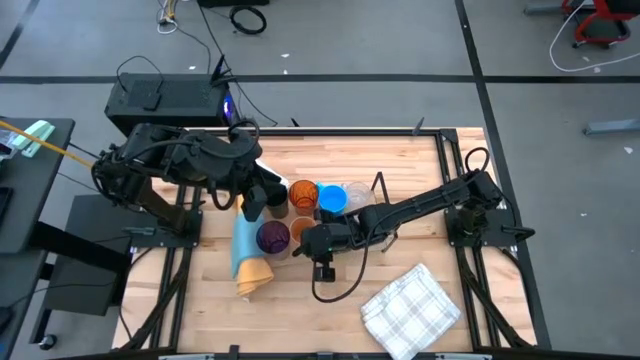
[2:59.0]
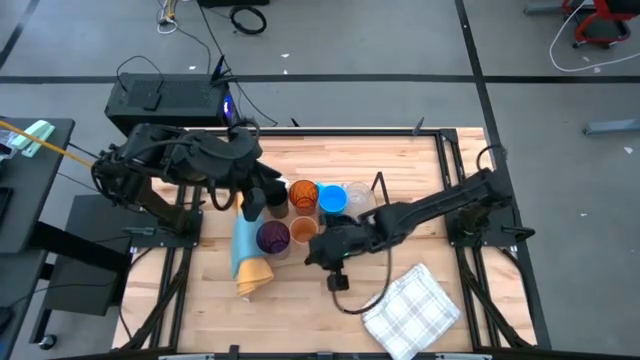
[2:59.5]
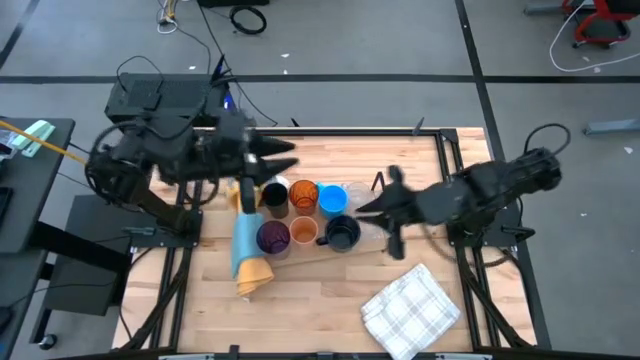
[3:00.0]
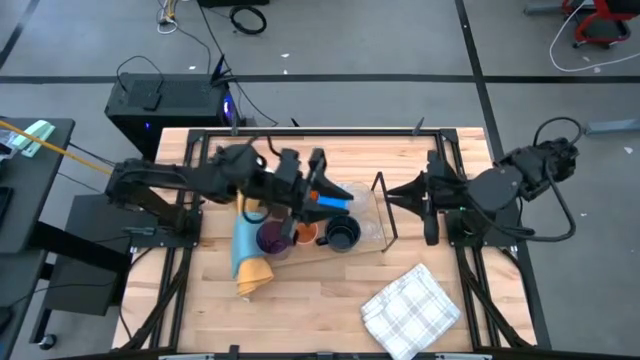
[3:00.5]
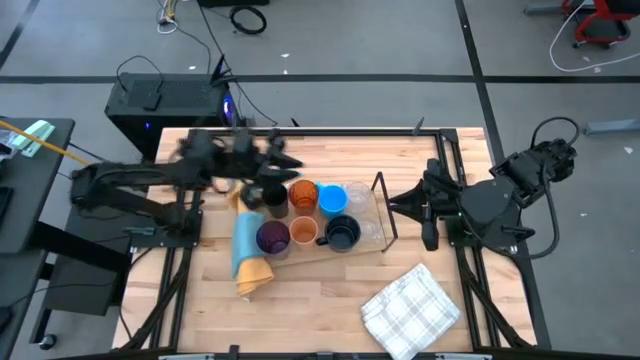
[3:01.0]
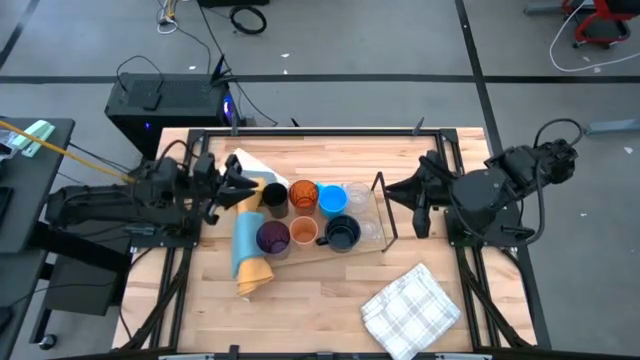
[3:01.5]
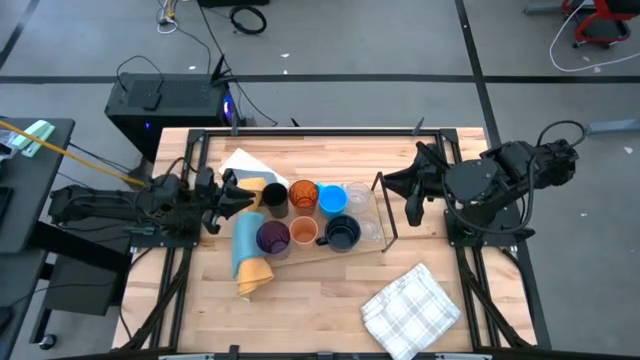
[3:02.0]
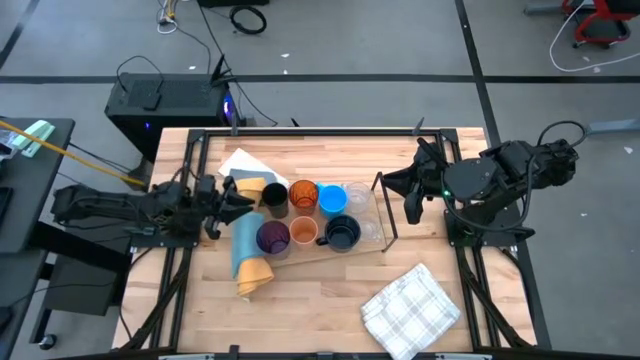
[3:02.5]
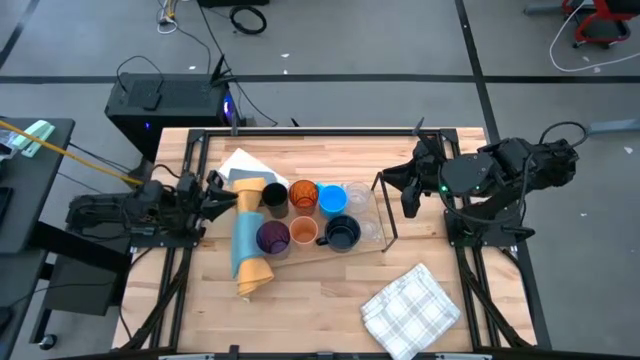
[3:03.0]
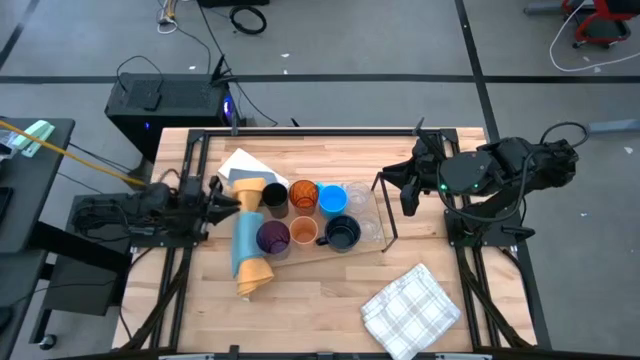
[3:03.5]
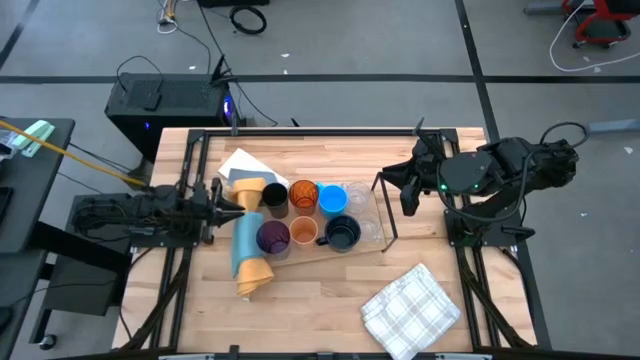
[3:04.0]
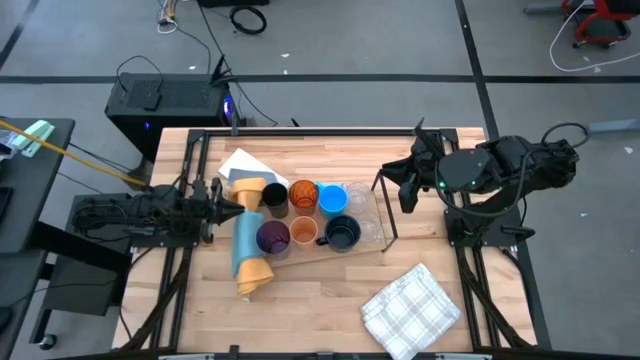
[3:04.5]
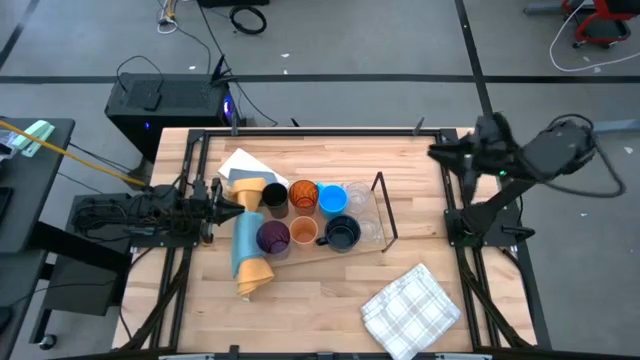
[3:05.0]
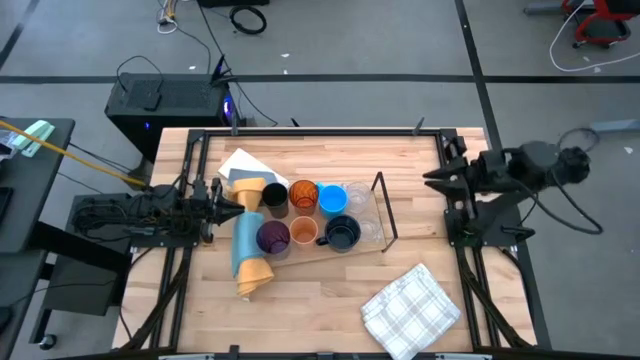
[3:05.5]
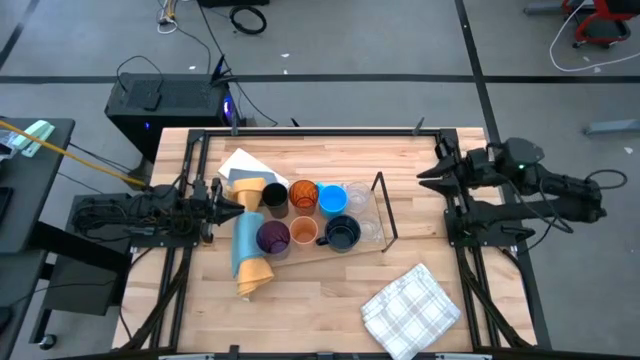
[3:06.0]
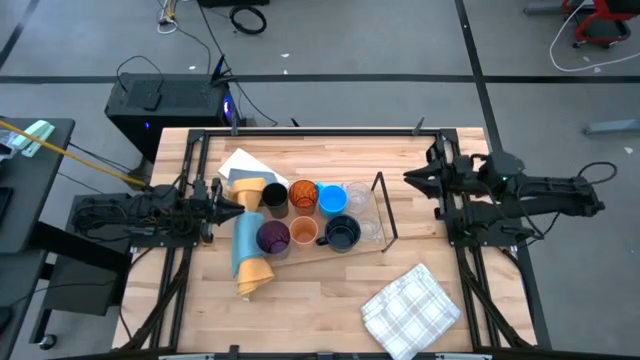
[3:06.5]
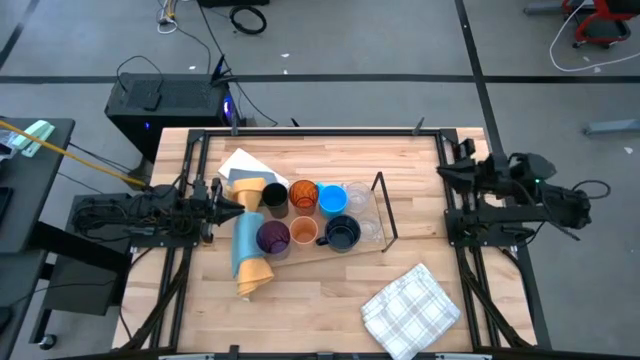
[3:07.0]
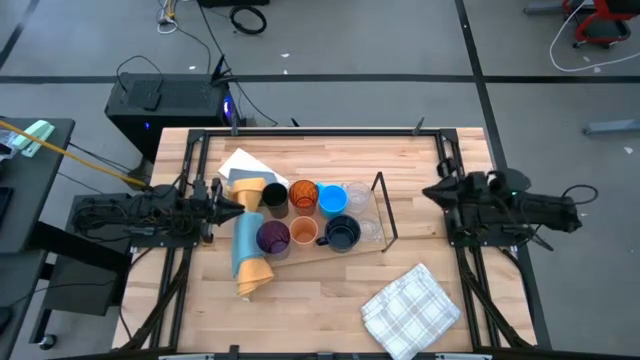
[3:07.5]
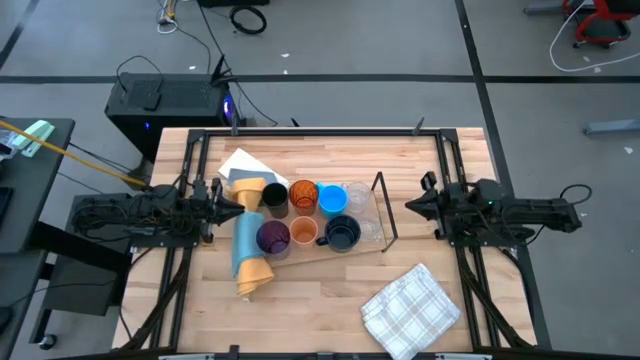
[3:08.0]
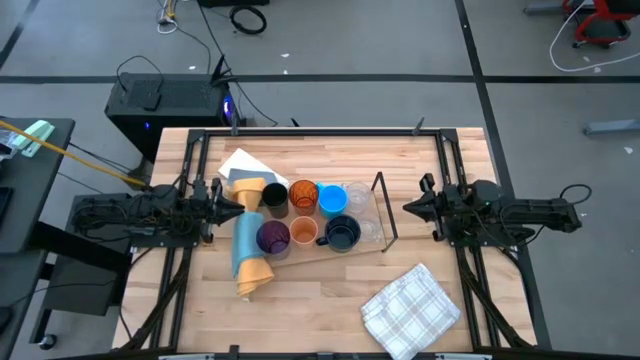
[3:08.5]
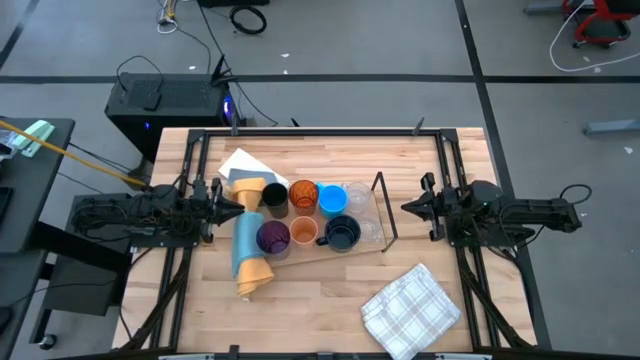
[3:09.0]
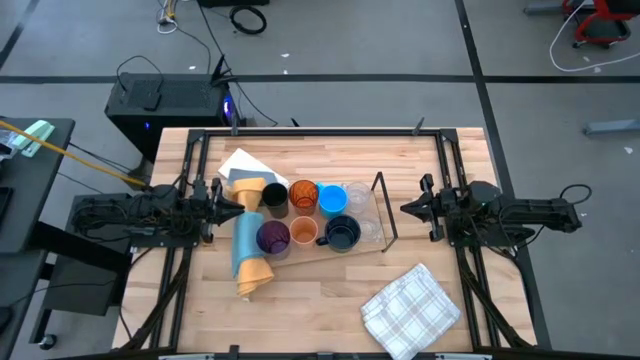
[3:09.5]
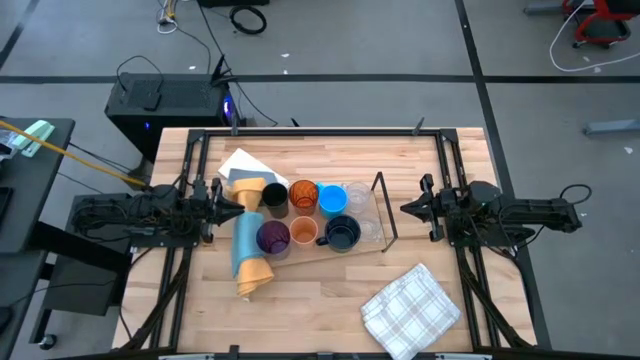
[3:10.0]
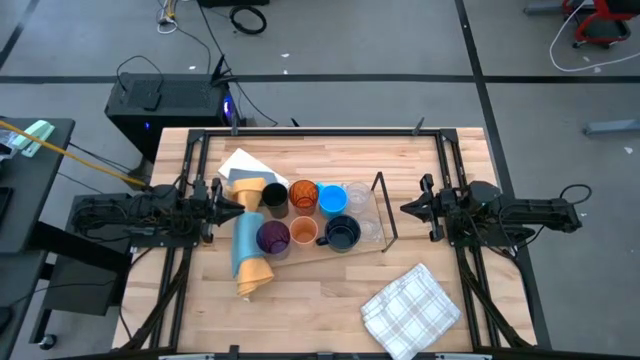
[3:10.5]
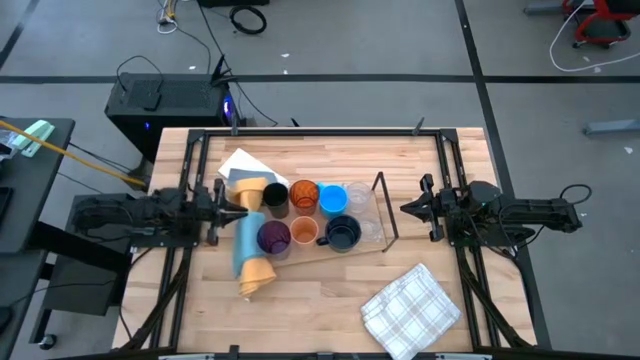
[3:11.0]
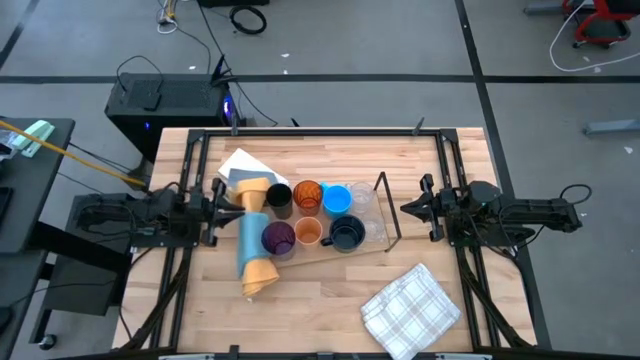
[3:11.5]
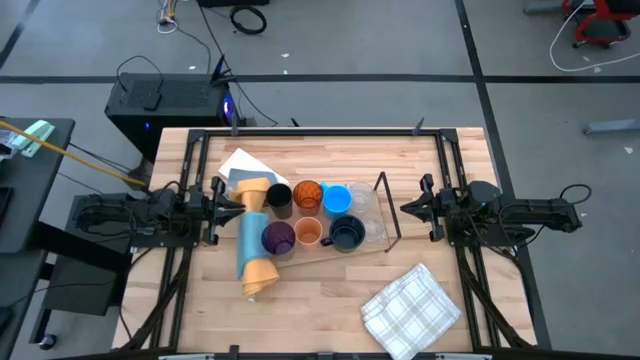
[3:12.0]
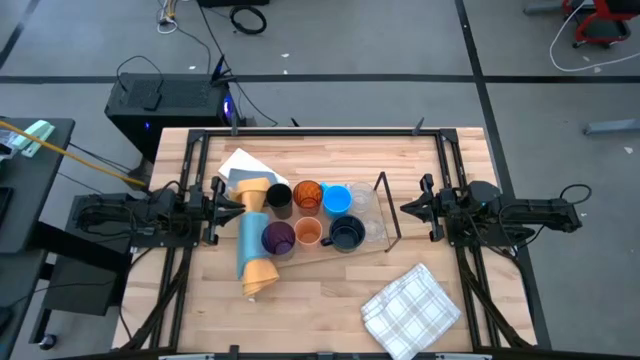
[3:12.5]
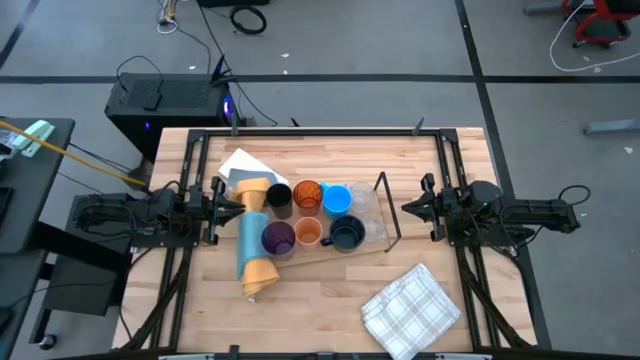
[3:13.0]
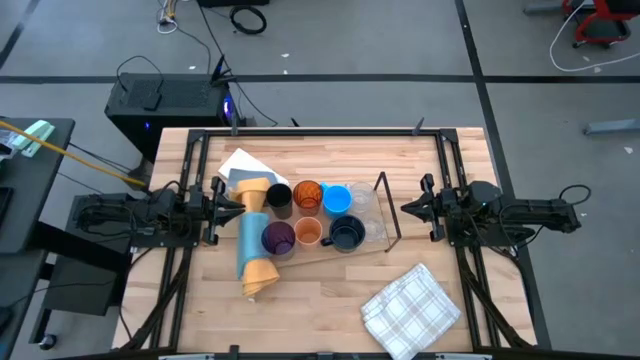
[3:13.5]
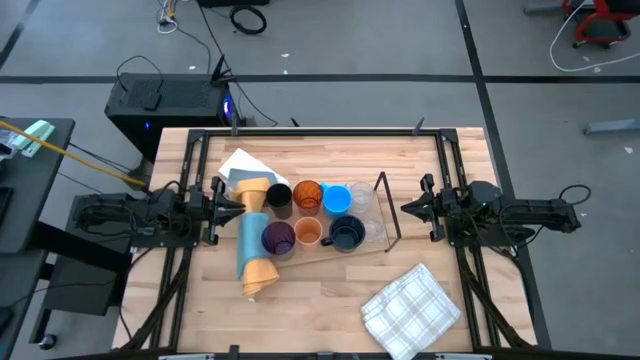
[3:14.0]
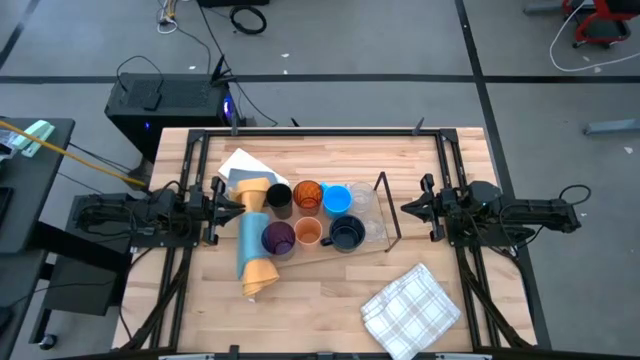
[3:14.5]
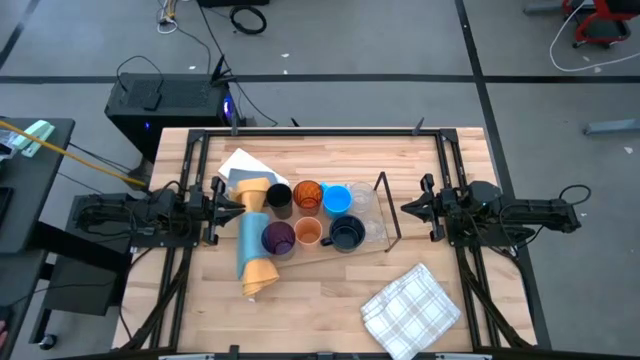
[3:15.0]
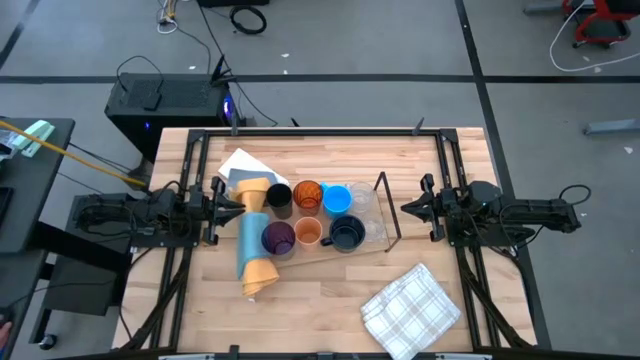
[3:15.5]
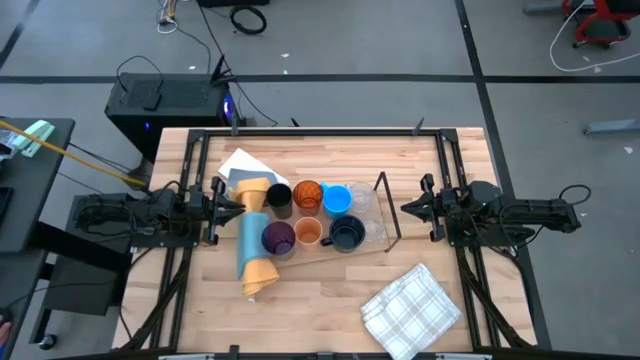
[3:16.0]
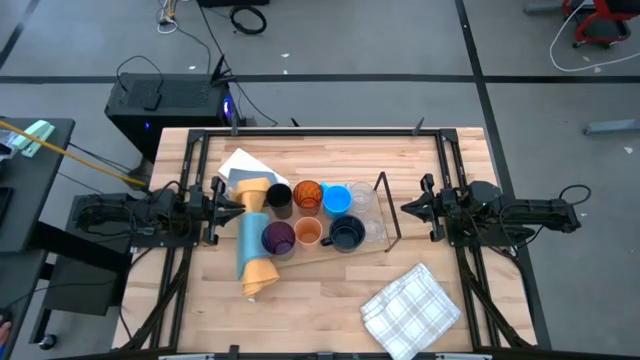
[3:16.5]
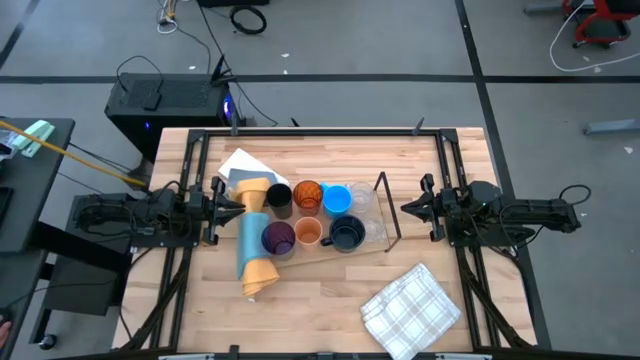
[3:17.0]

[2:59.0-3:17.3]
Task: Stack small to large cups/mugs on shelf
Return to Home Position

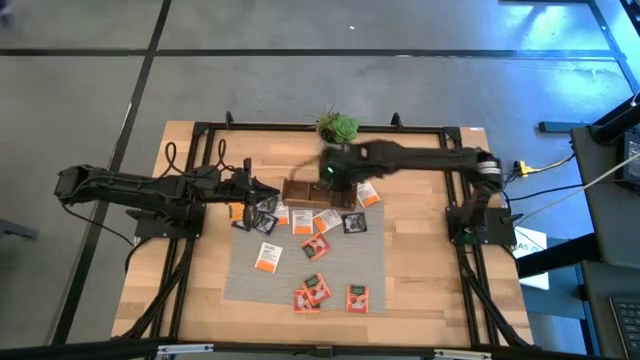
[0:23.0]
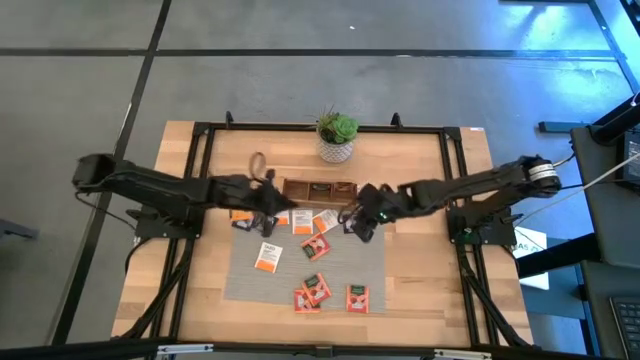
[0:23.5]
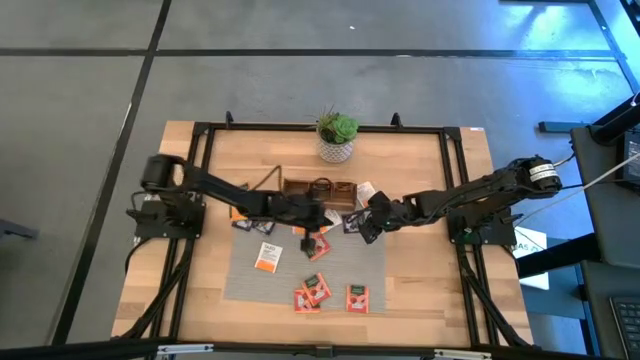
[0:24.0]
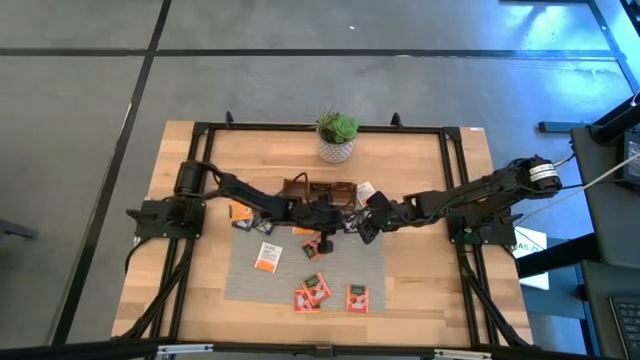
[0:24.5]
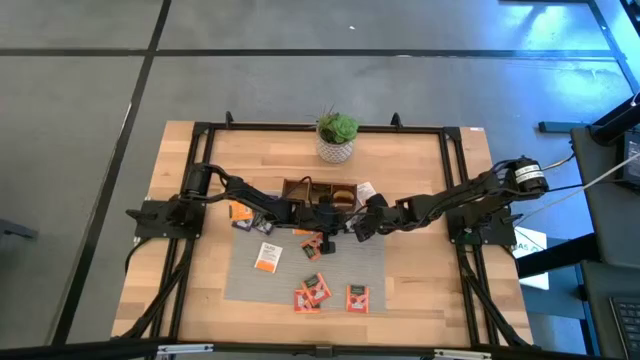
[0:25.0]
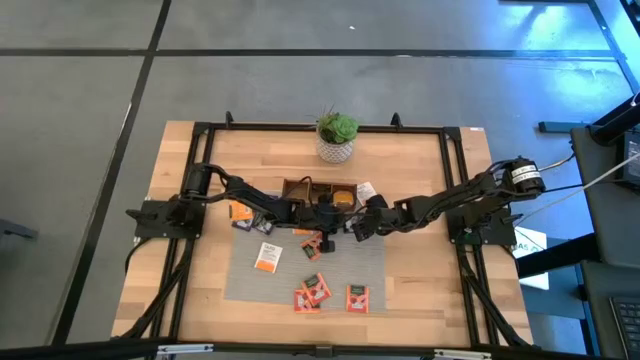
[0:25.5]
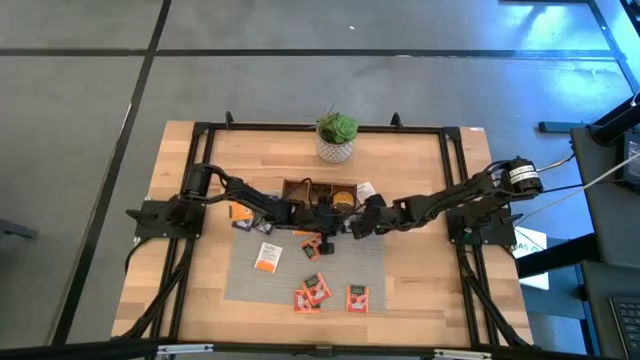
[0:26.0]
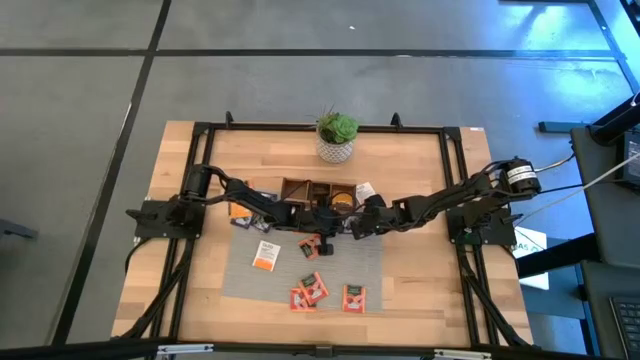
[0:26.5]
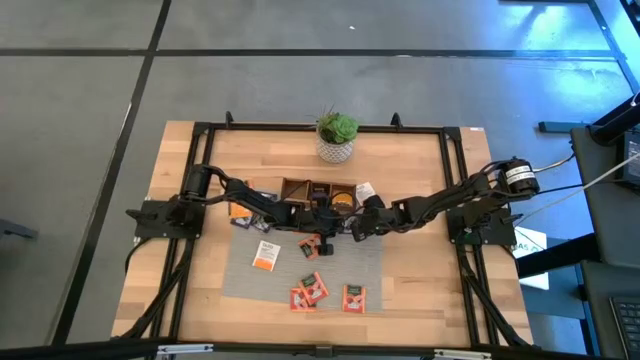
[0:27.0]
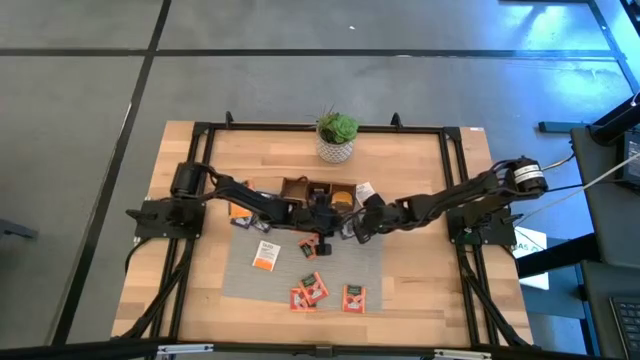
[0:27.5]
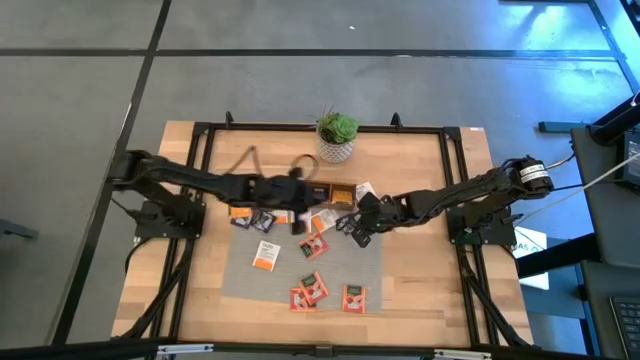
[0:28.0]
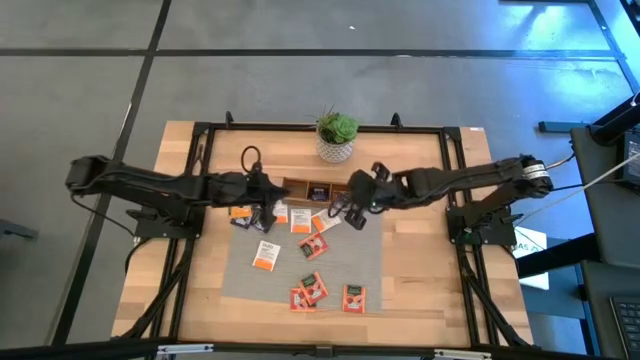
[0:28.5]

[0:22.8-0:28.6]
Task: Pick & Place Tea
Put the dark blue tea bag into the middle section of the wooden organizer
